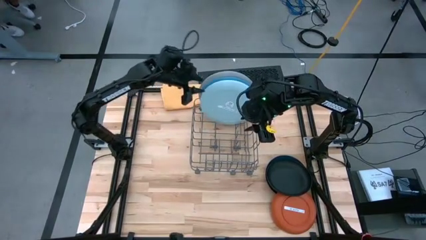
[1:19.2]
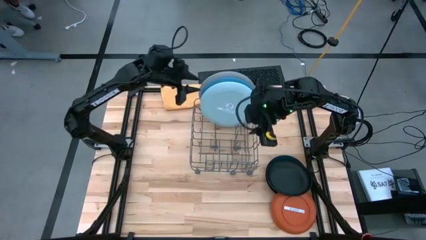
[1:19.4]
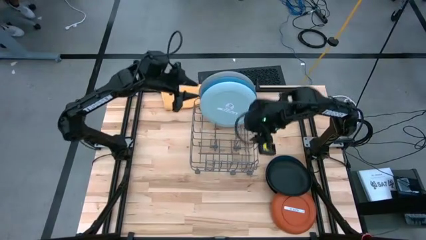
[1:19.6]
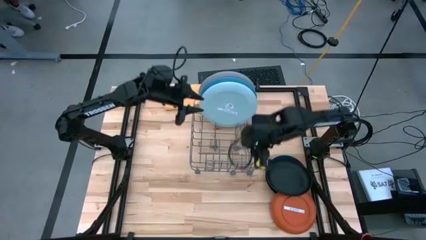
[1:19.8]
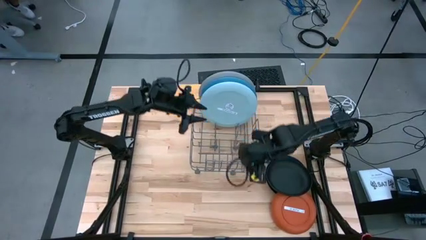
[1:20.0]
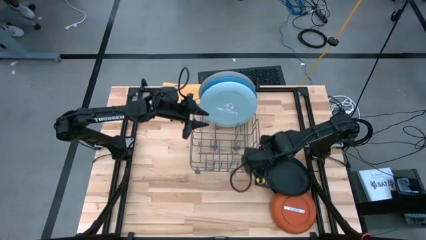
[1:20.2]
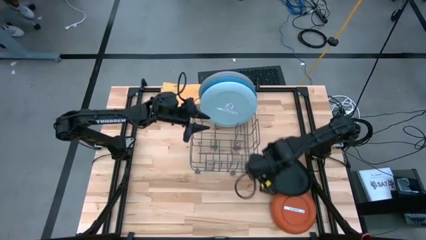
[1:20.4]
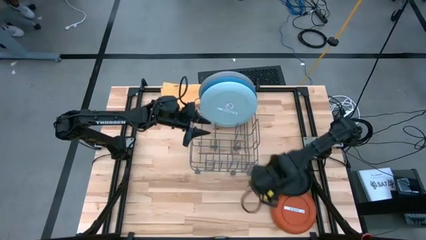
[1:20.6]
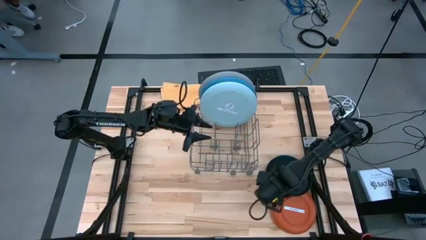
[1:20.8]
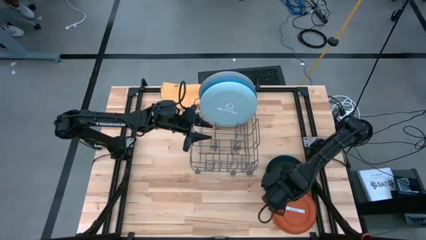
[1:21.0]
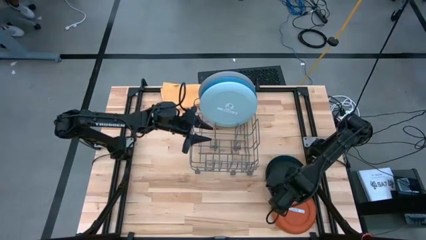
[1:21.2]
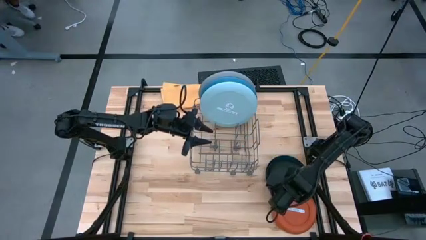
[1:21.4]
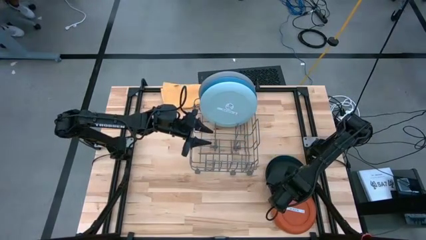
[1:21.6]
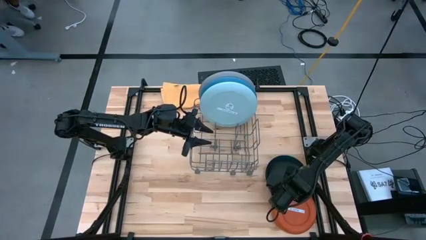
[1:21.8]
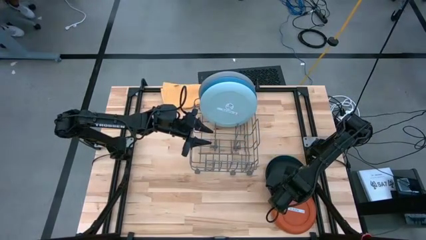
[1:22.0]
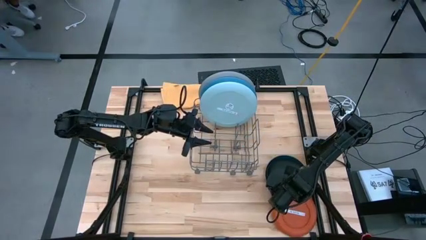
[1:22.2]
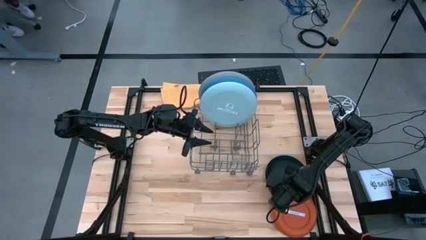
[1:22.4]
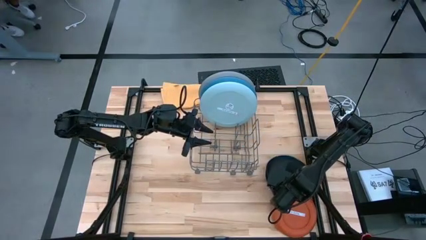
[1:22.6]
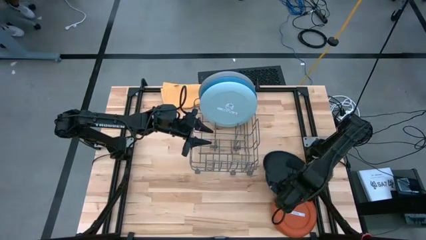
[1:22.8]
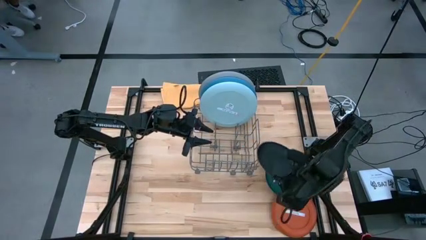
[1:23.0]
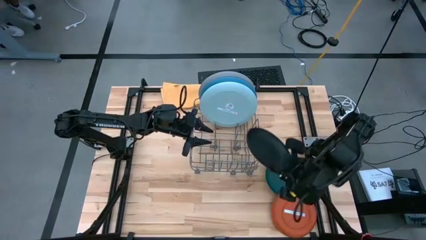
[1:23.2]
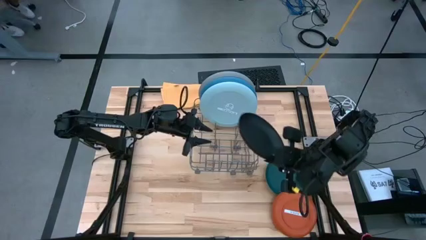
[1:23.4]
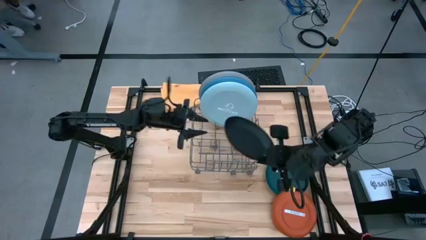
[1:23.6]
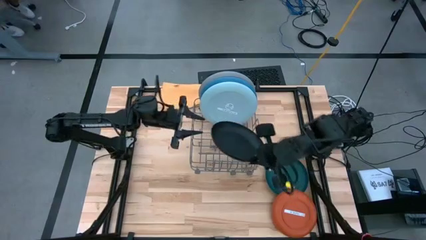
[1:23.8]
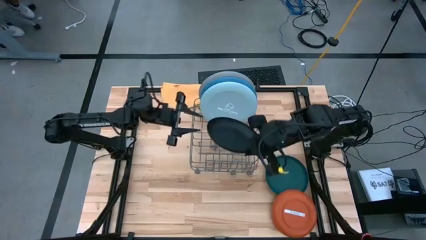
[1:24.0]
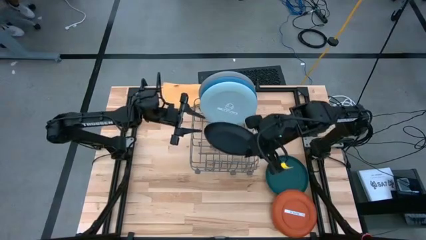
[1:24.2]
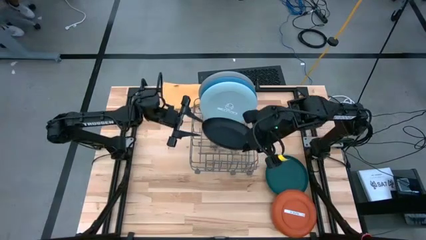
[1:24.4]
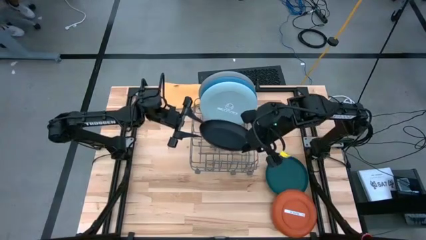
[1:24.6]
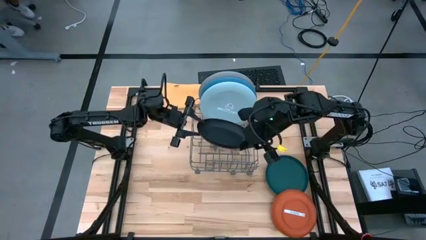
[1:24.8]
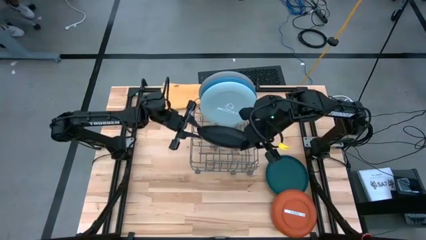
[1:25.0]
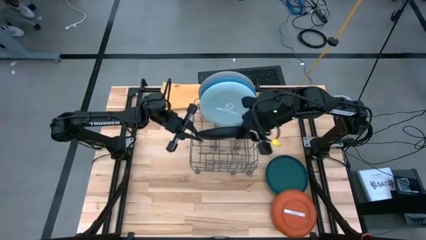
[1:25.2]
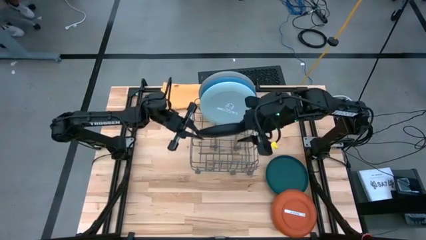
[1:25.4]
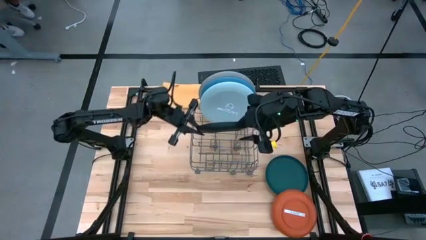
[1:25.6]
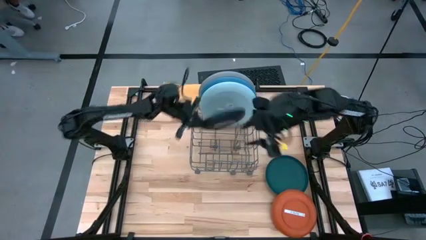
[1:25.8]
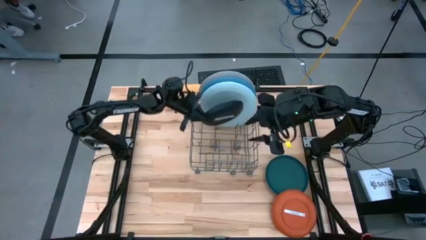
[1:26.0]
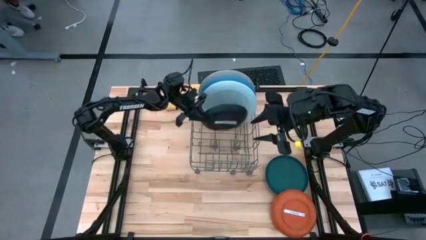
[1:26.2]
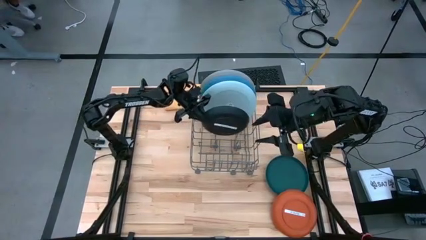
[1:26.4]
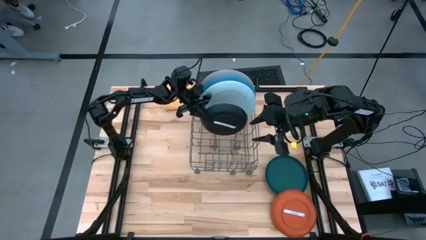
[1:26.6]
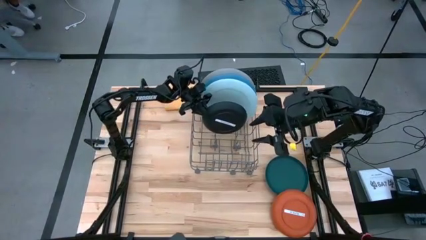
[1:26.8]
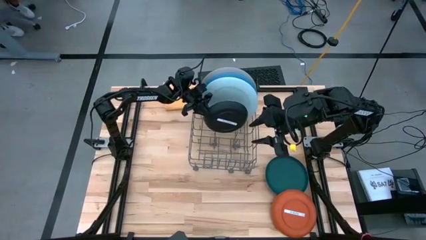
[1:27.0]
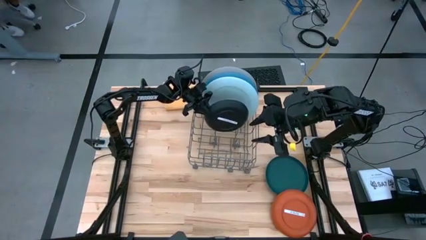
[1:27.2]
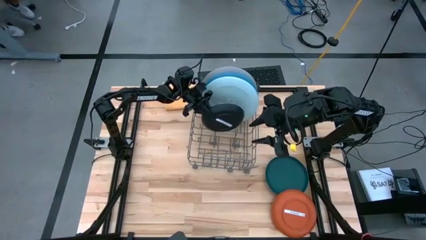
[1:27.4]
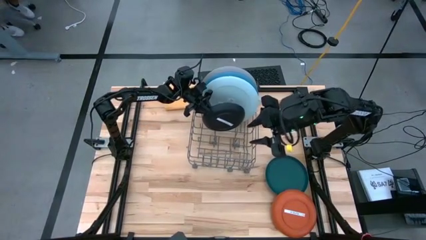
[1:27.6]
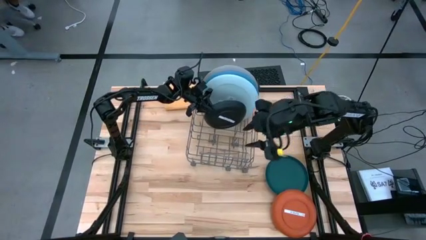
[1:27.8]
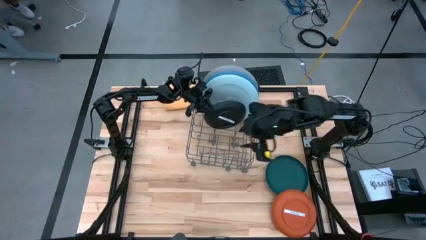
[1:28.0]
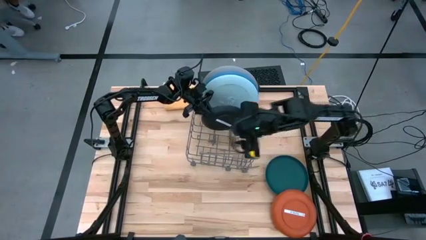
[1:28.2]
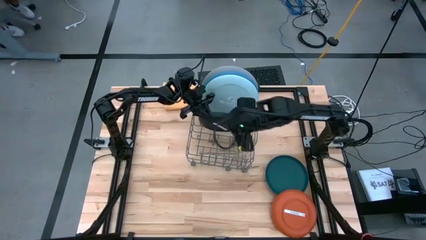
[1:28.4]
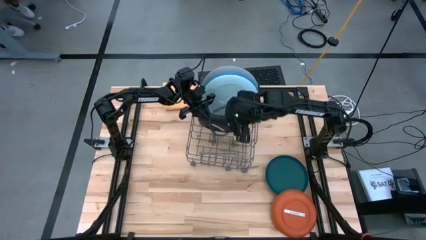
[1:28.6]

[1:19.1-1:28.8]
Task: Sort dishes
Put the black plate into the dish rack

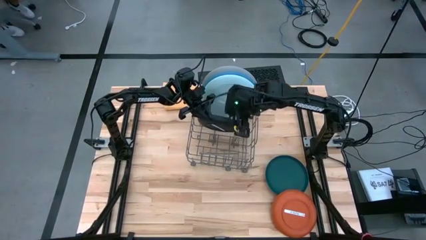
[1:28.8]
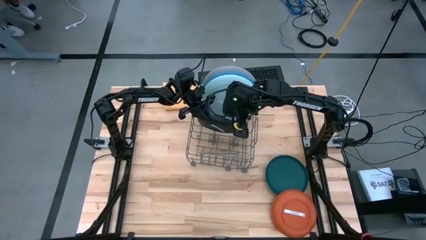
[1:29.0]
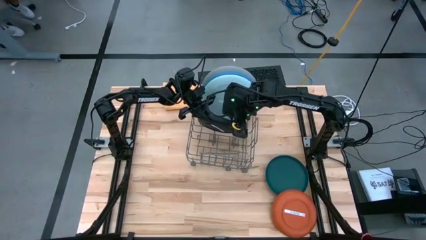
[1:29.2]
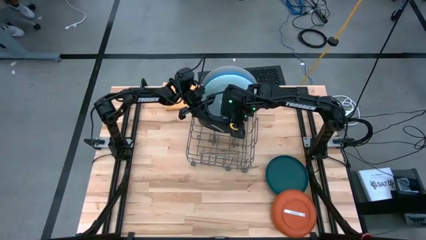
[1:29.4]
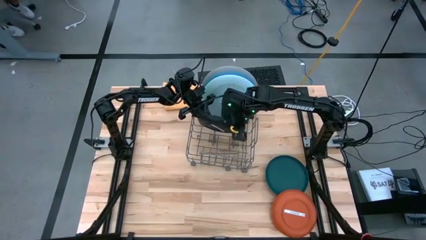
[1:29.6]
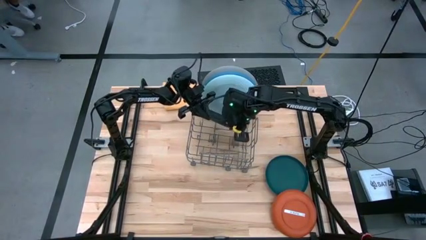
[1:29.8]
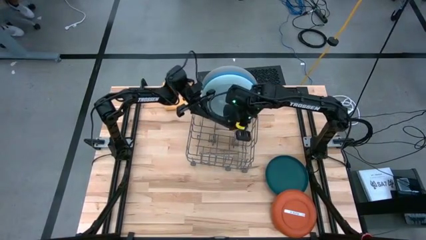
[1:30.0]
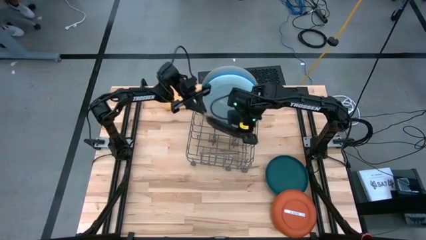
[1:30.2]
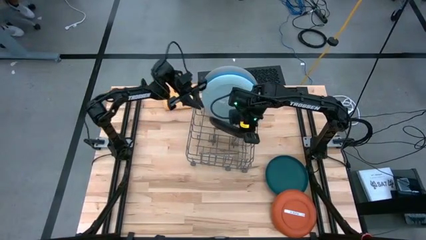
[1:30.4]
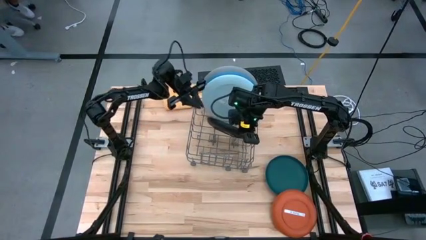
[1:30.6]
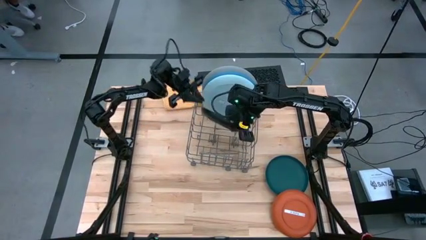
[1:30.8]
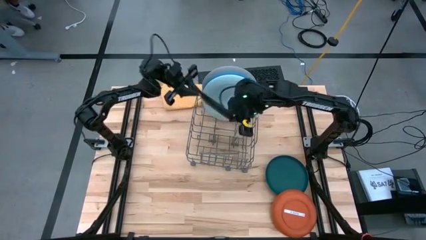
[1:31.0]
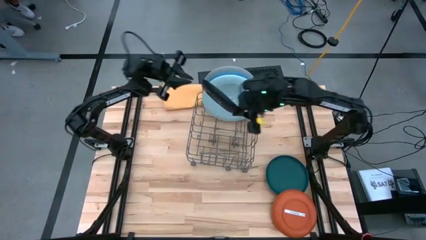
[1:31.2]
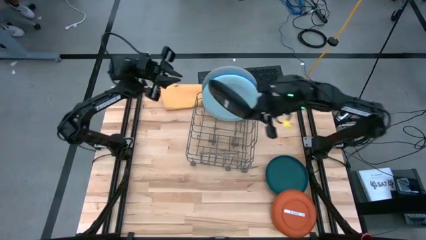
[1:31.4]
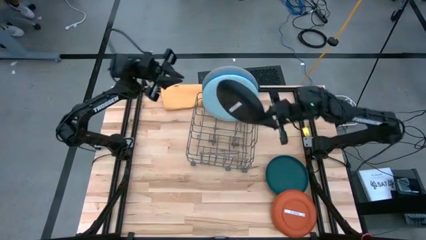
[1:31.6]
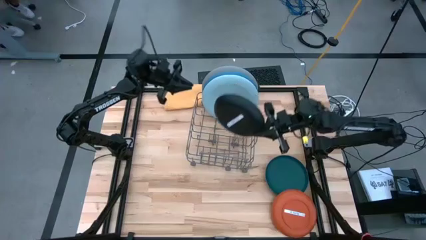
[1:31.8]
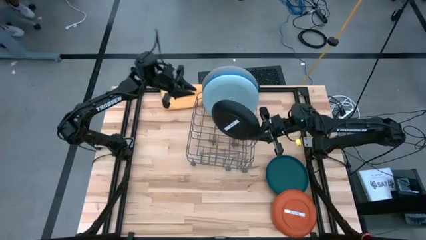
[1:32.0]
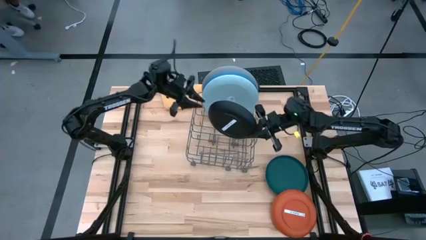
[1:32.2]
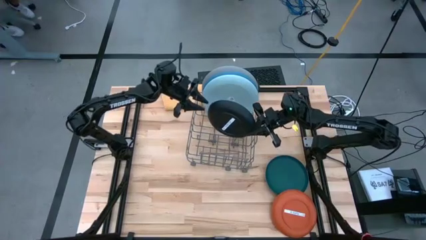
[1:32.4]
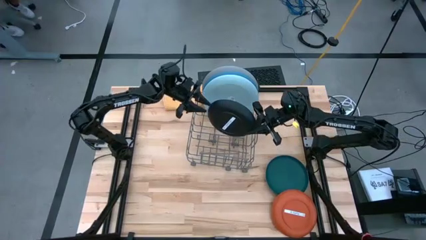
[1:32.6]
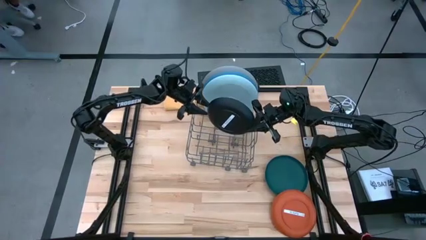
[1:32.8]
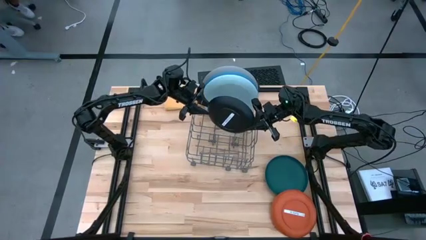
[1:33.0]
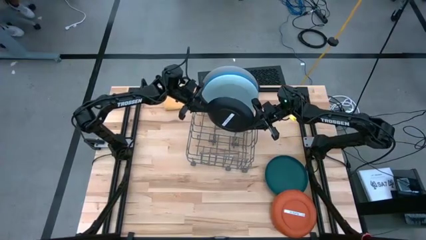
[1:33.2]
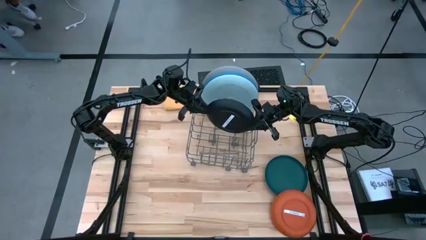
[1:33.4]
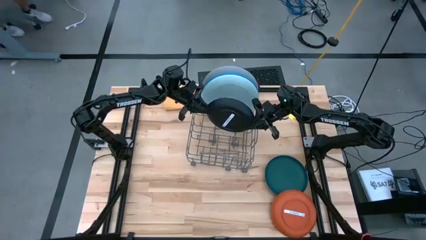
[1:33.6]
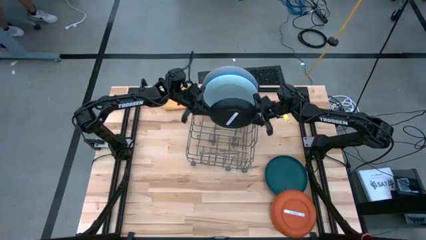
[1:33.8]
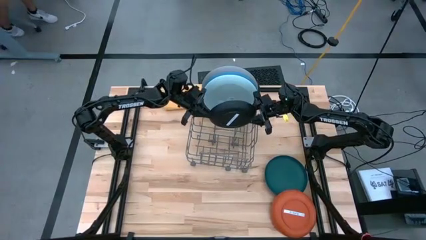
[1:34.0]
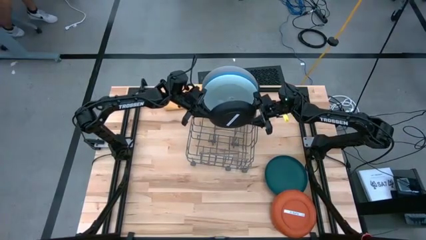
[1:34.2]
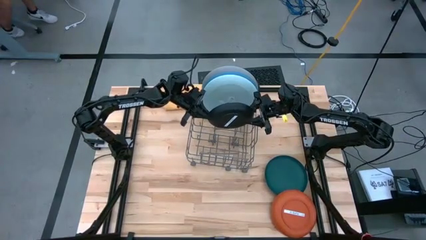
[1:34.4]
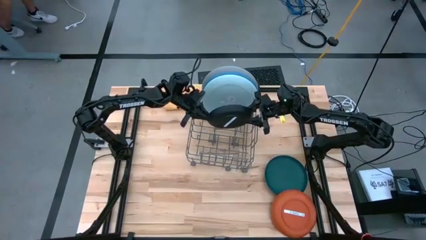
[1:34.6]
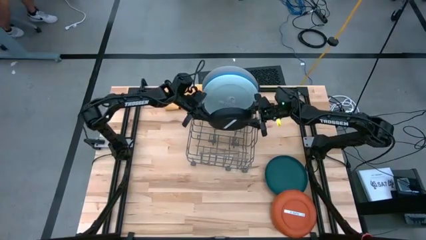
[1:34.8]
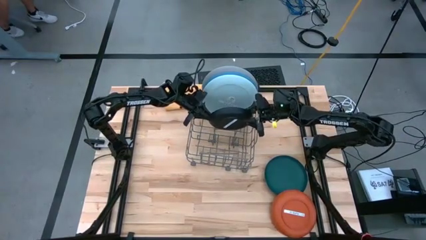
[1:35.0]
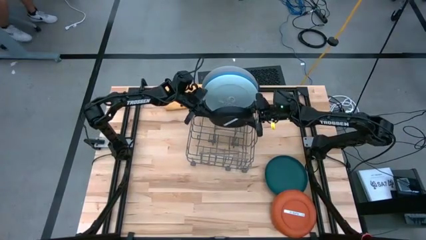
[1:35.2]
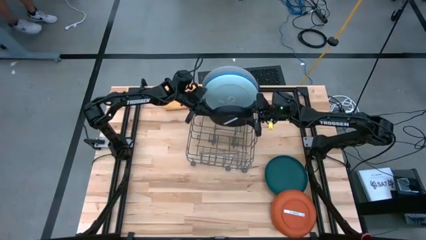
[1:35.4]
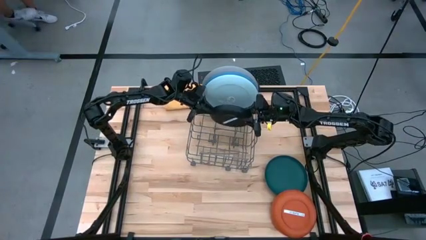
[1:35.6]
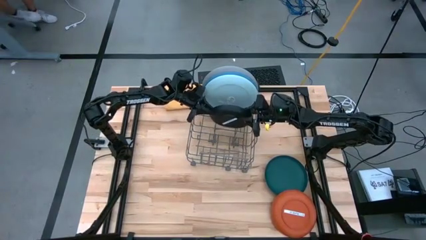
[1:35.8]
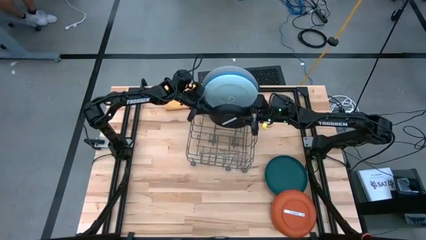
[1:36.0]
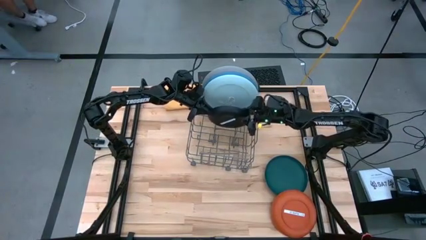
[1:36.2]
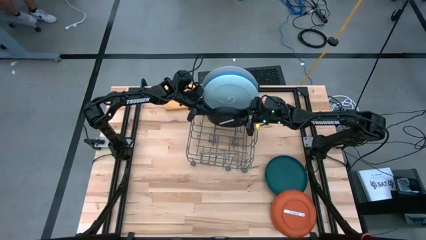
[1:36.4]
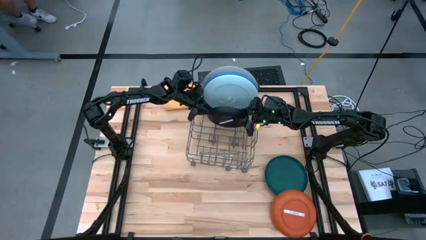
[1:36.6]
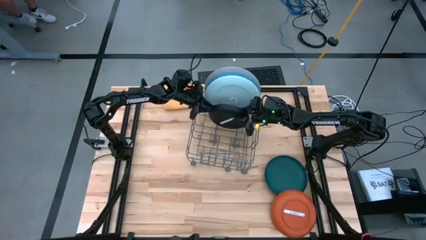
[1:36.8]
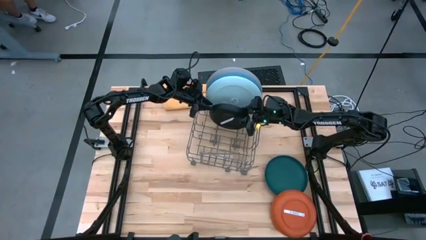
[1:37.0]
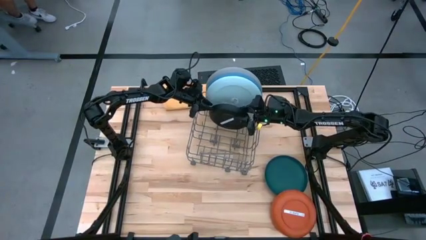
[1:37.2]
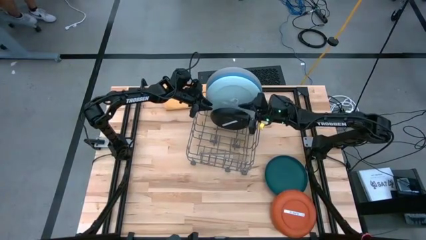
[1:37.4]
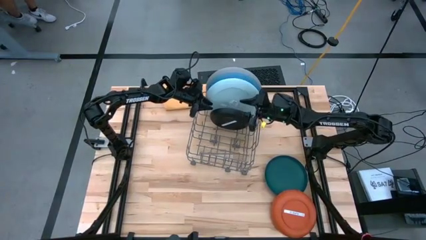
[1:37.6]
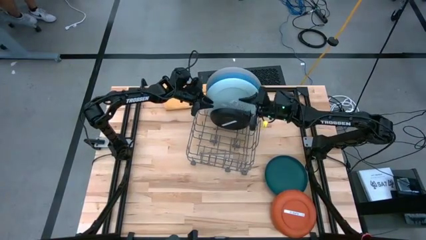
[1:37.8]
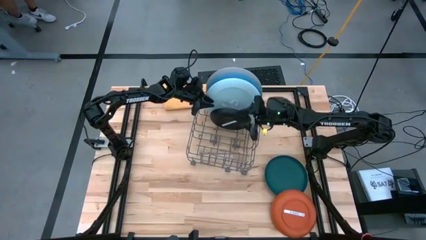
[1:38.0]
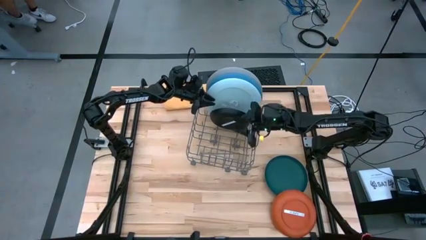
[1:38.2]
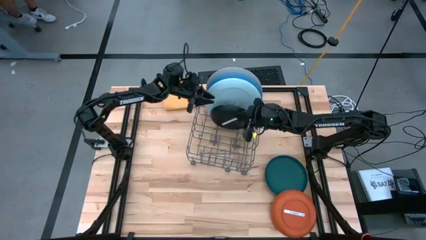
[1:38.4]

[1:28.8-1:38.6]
Put the black plate into the dish rack
